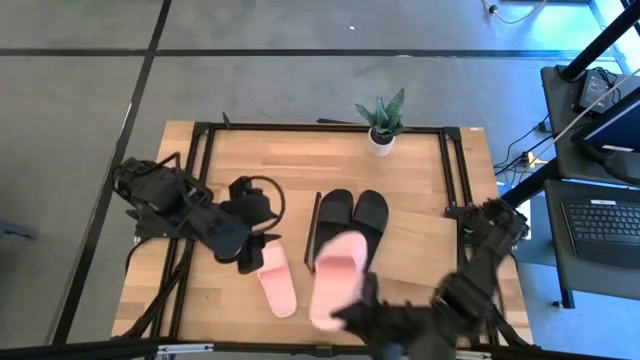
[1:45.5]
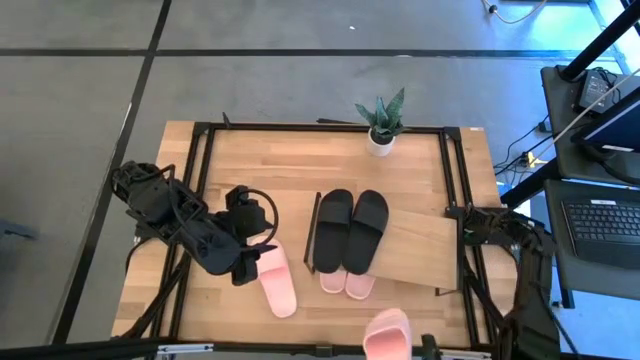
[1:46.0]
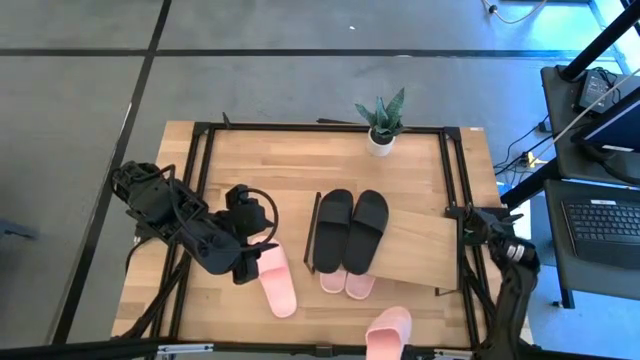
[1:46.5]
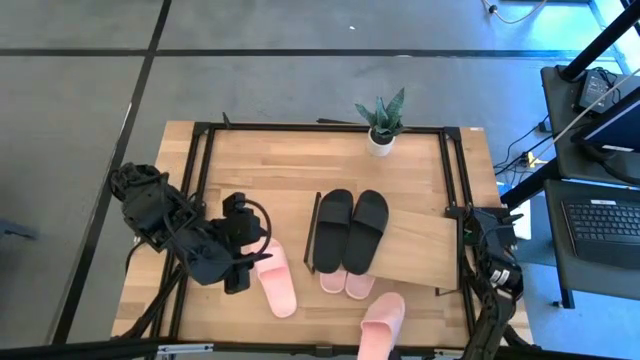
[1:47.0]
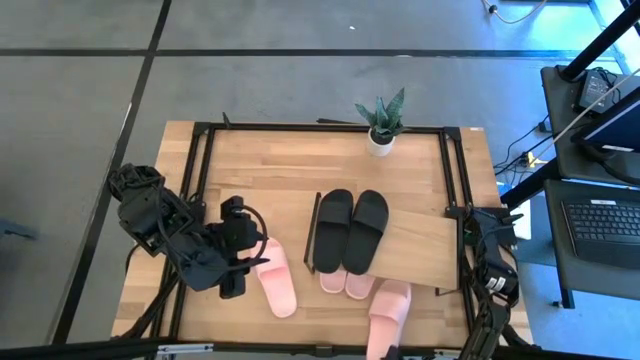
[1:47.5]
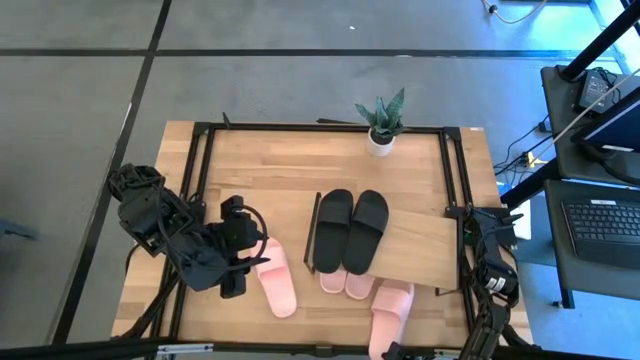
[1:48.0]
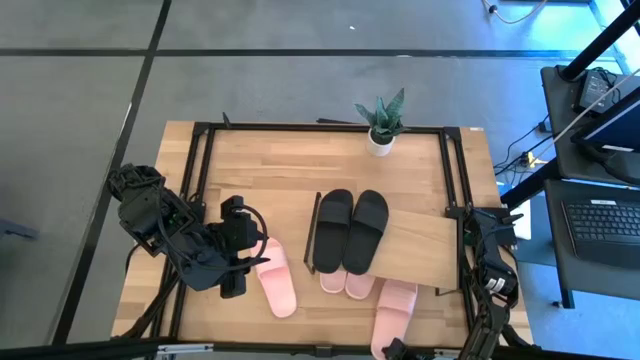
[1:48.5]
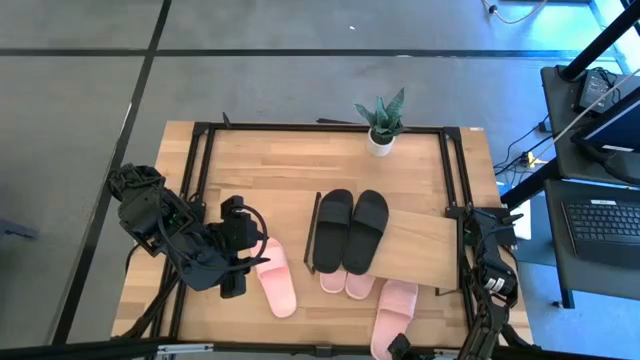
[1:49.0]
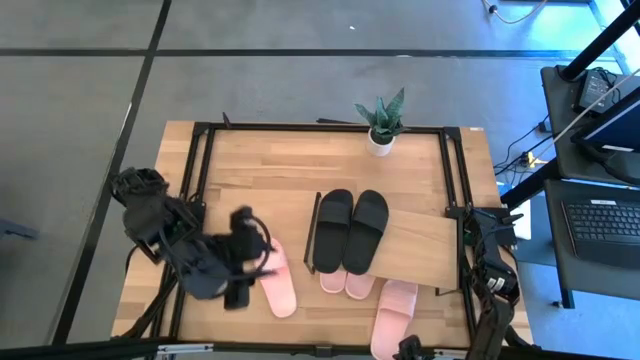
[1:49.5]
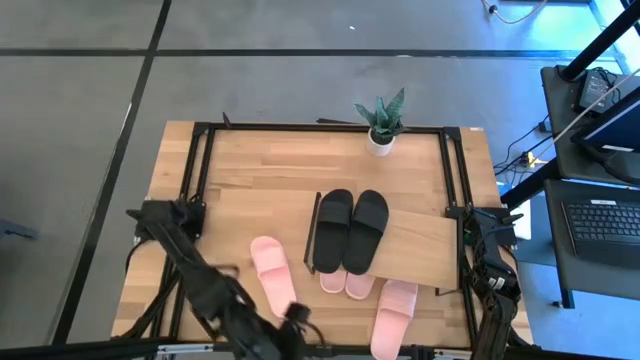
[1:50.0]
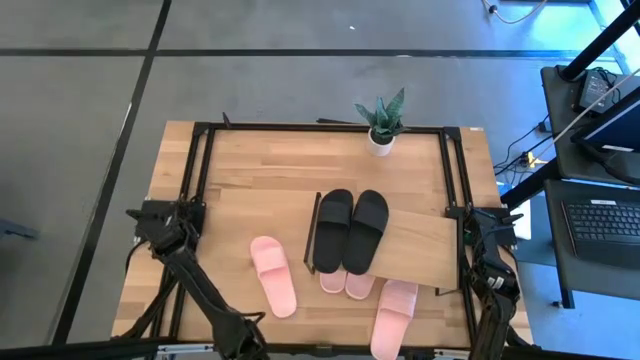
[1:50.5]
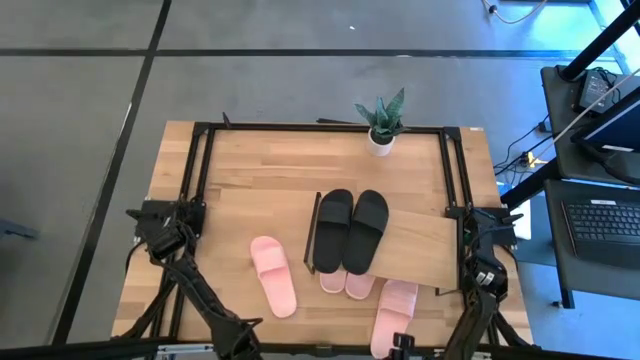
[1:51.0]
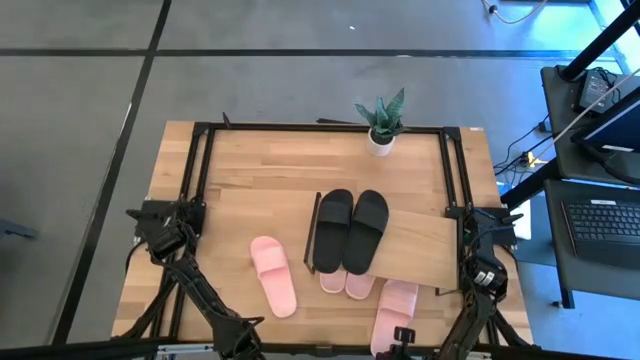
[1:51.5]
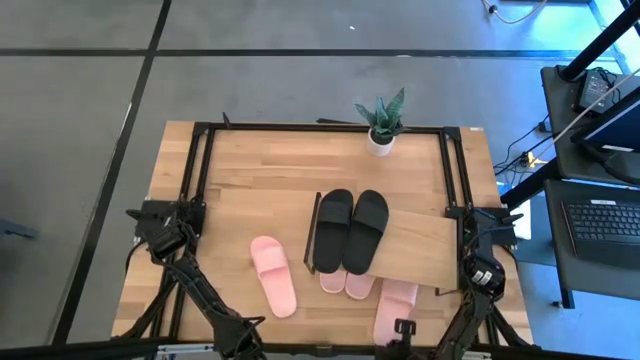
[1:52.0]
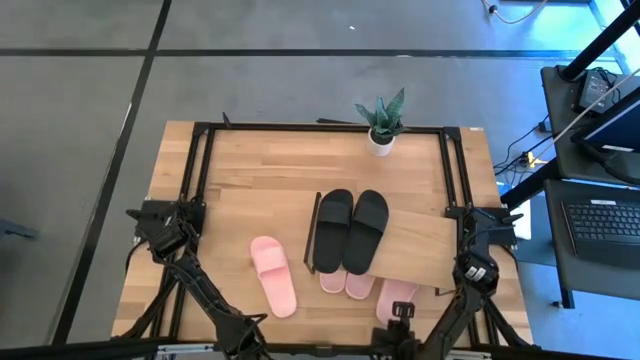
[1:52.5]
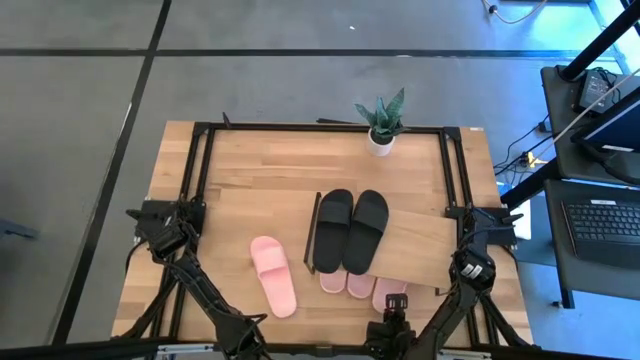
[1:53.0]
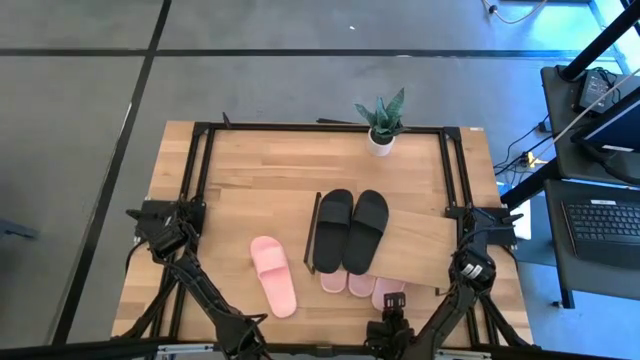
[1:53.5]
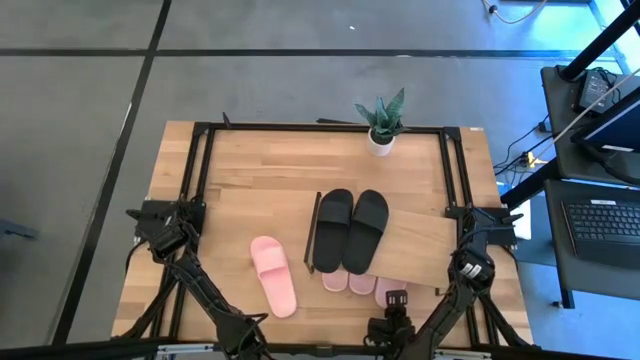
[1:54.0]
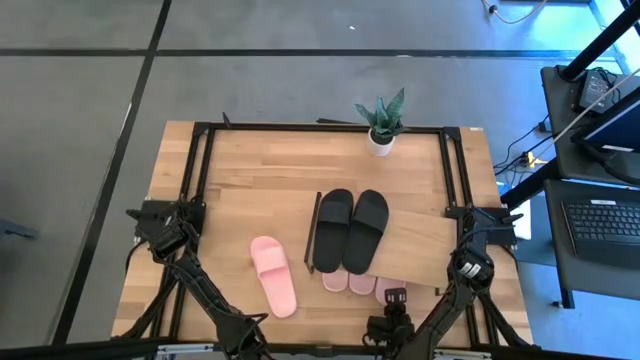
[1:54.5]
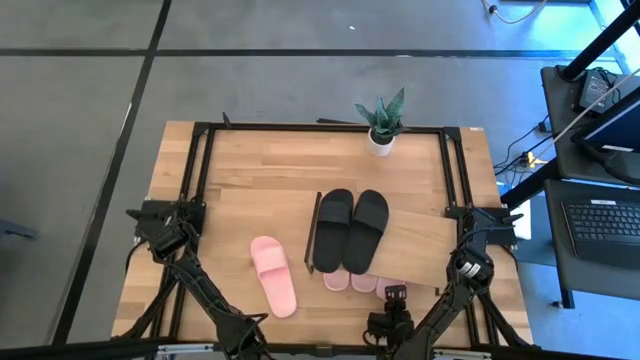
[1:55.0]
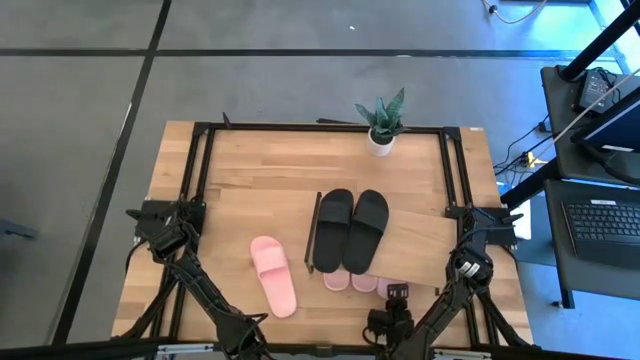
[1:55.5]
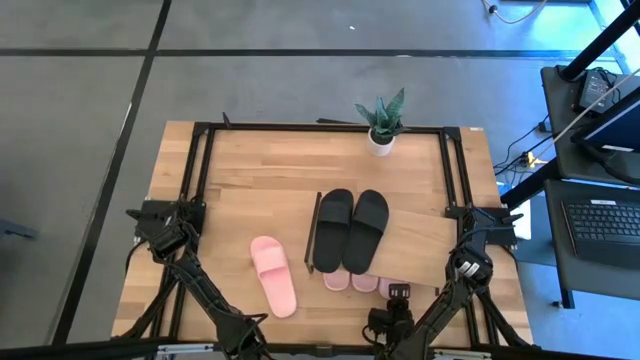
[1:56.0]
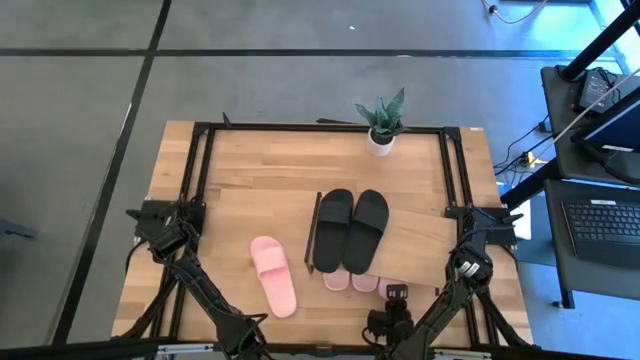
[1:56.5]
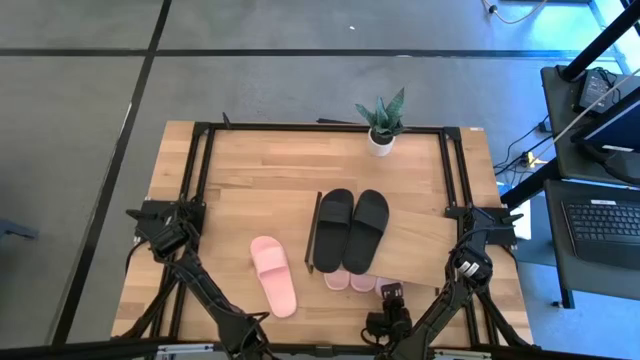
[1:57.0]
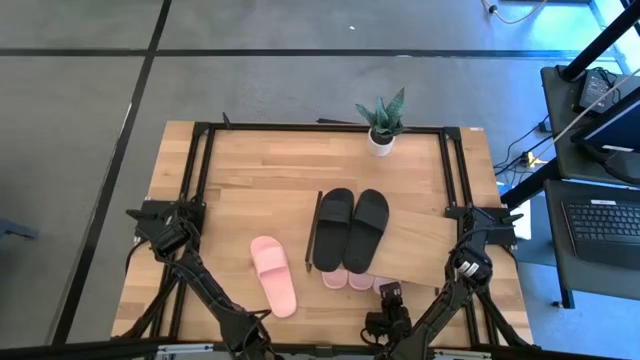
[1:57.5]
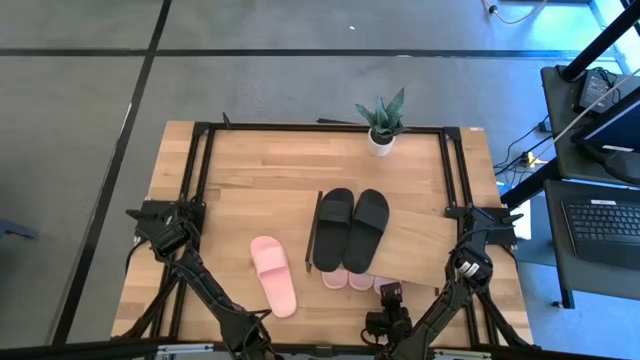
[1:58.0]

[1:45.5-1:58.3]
Task: Pick and place slides into the shelf
Put the left pink slipper under the shelf

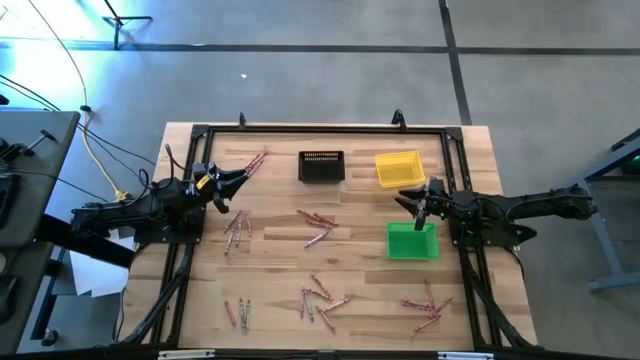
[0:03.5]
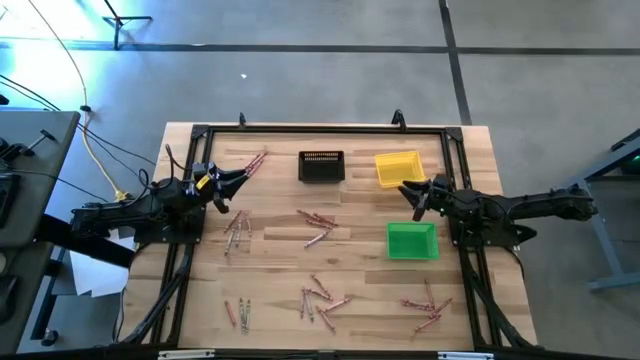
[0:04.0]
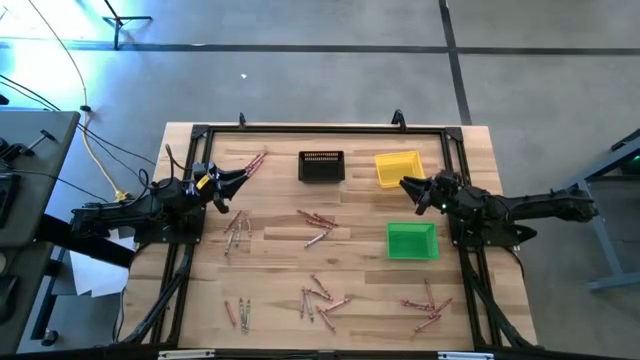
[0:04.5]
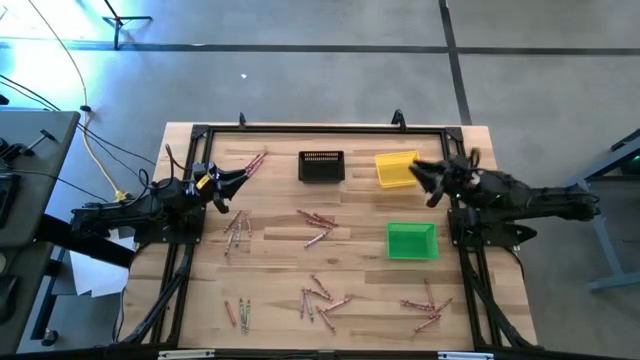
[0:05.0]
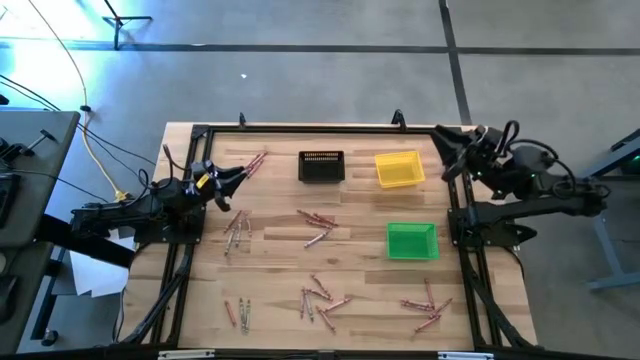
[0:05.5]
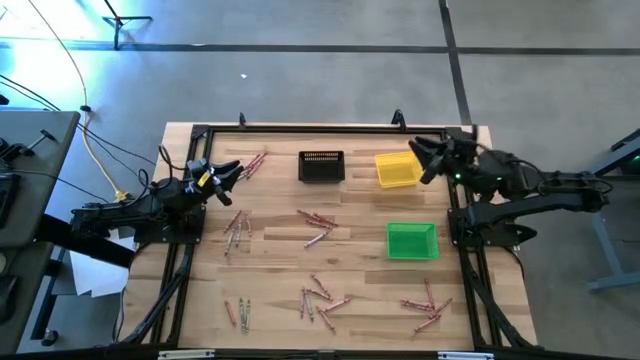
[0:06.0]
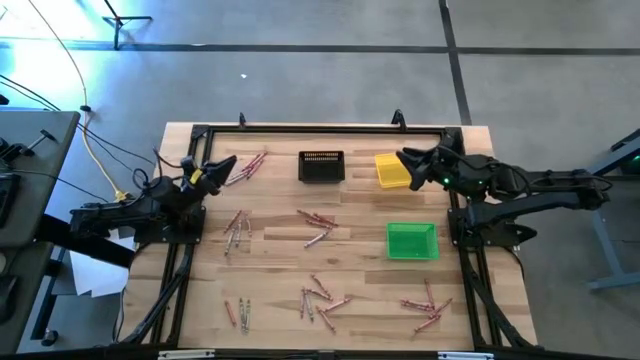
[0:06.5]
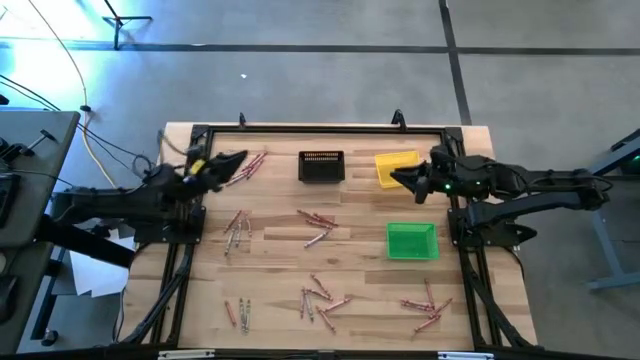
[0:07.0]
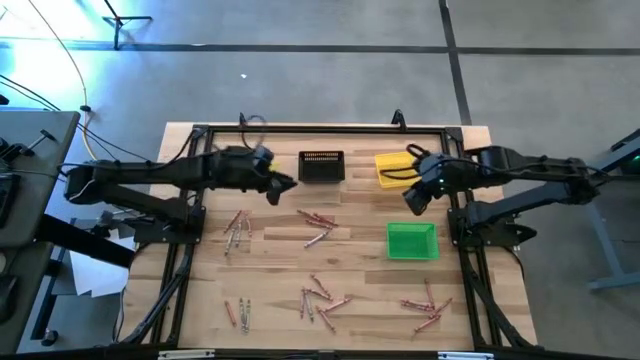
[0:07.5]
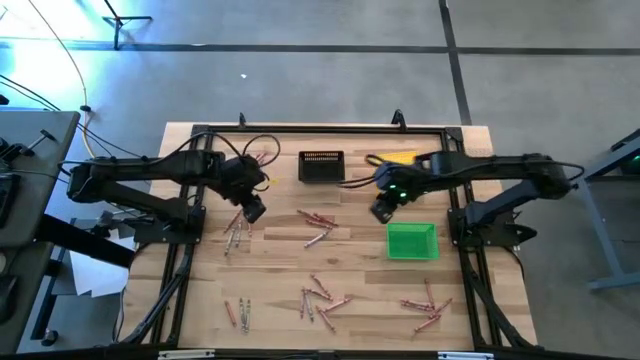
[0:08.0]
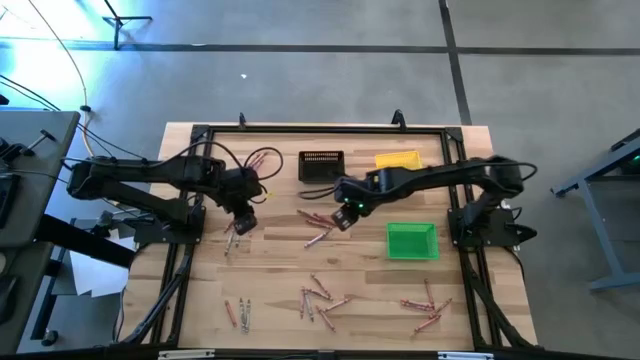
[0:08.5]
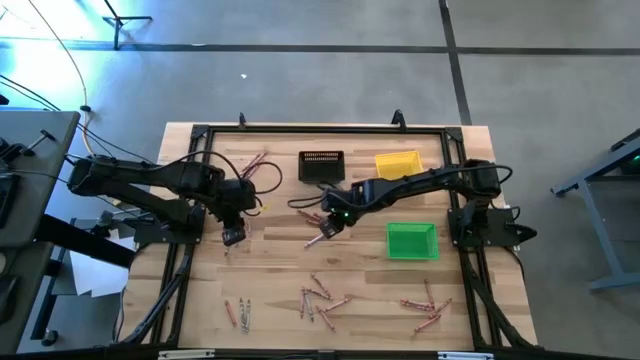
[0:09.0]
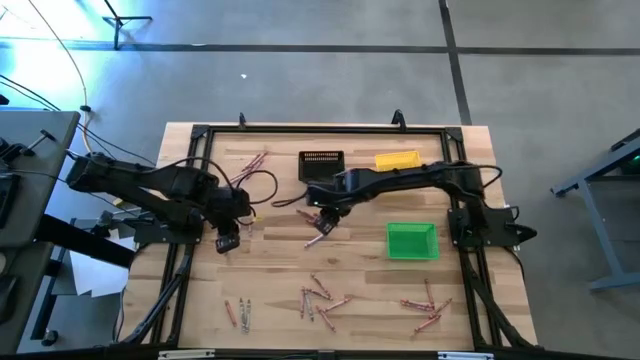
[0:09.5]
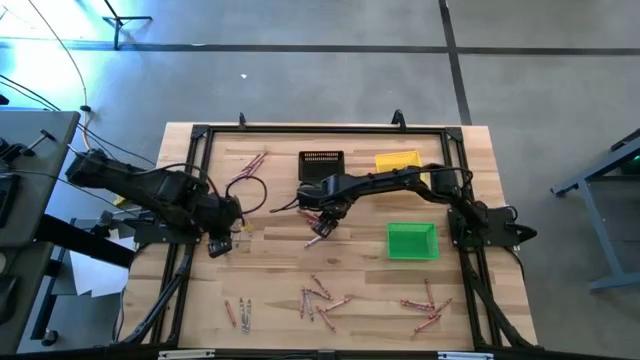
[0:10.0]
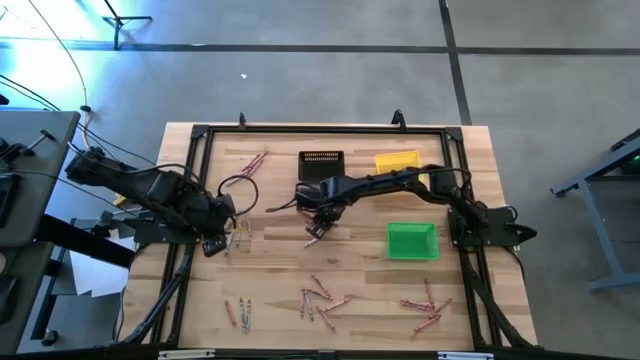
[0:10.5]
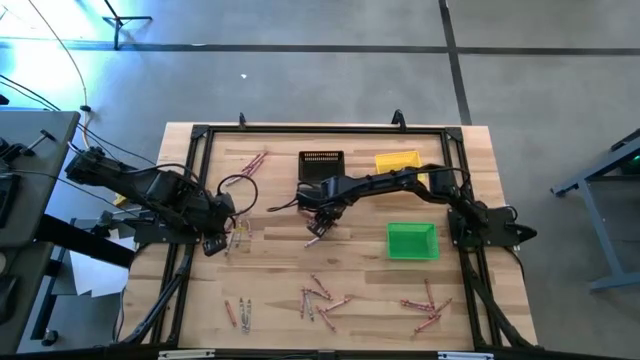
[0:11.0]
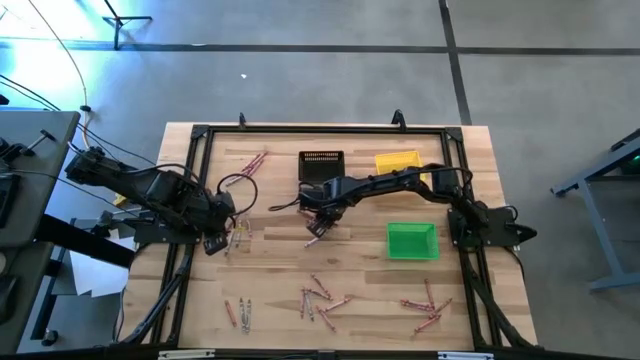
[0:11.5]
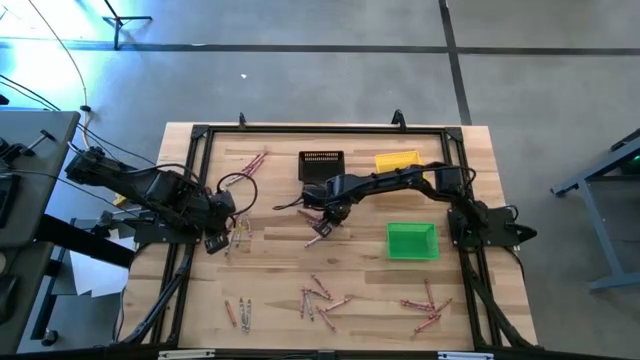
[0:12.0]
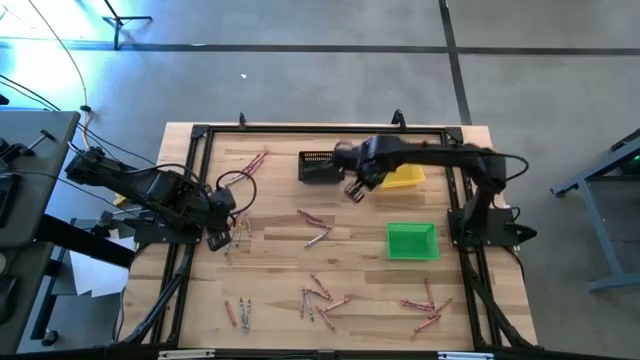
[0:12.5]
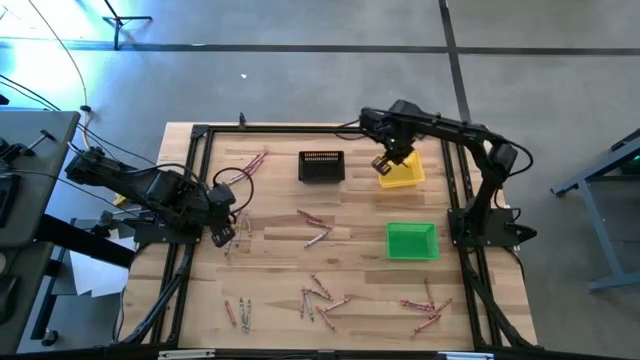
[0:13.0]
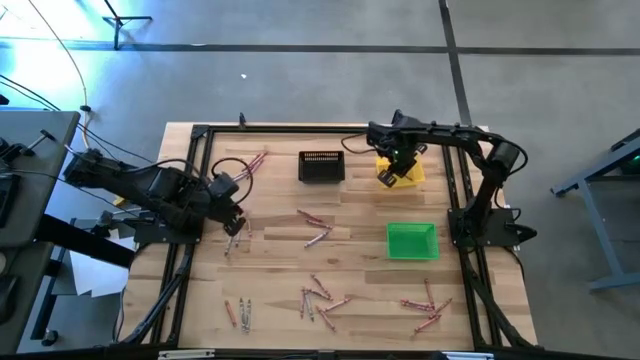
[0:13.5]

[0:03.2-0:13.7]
Task: Sort crayons
Put the red crayon into the yellow basket
